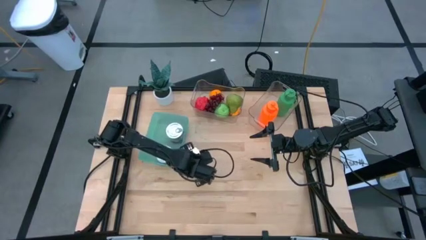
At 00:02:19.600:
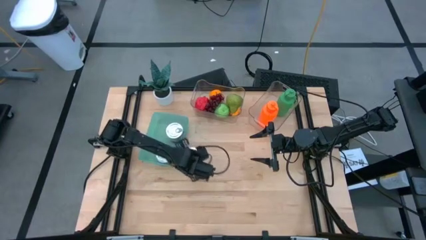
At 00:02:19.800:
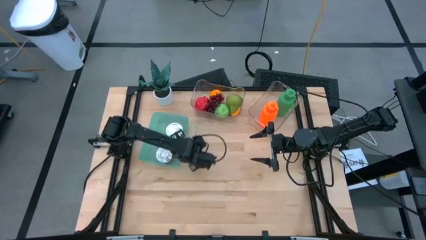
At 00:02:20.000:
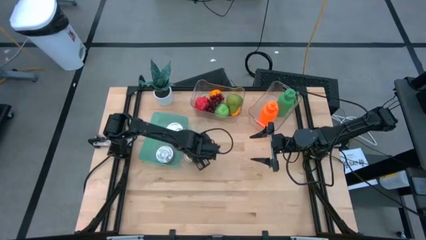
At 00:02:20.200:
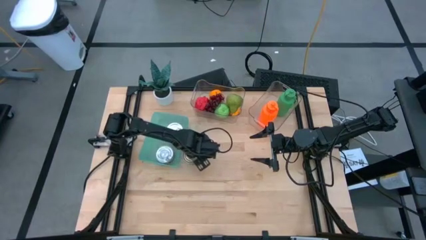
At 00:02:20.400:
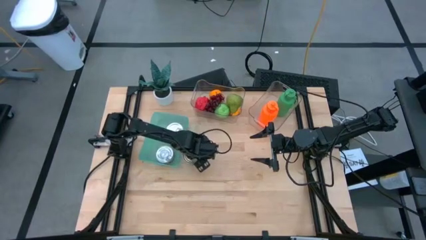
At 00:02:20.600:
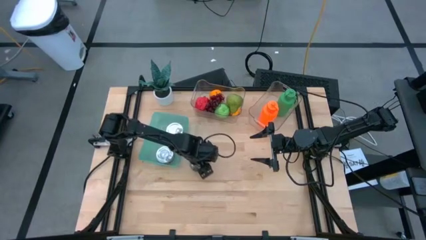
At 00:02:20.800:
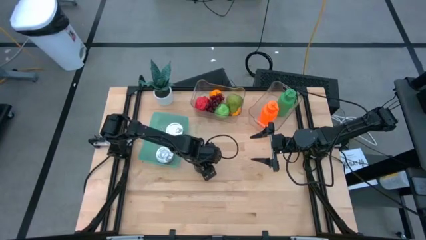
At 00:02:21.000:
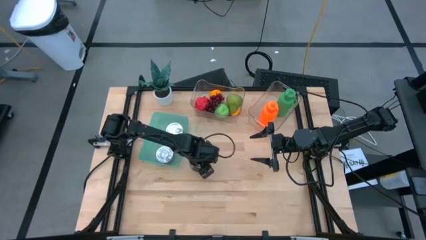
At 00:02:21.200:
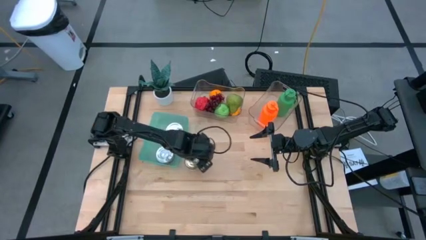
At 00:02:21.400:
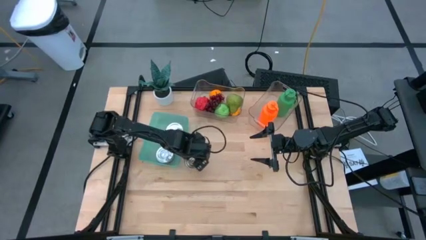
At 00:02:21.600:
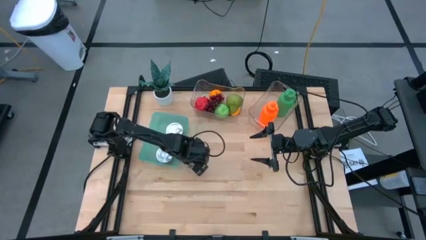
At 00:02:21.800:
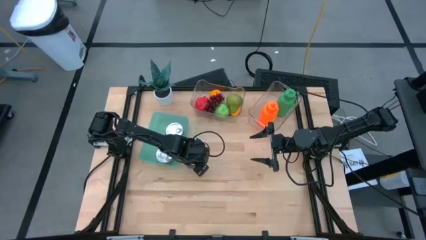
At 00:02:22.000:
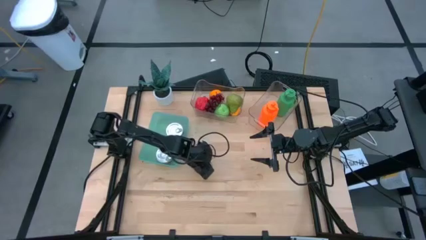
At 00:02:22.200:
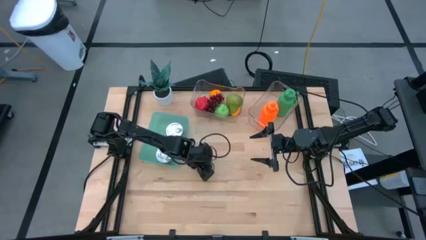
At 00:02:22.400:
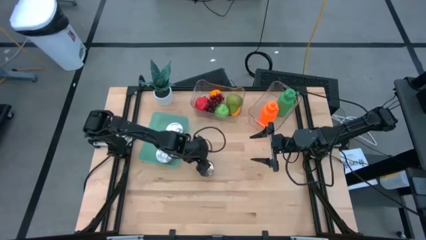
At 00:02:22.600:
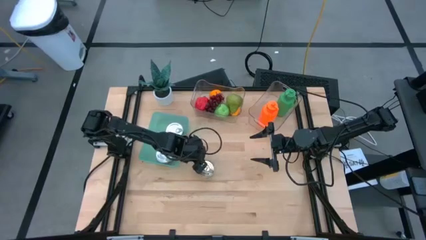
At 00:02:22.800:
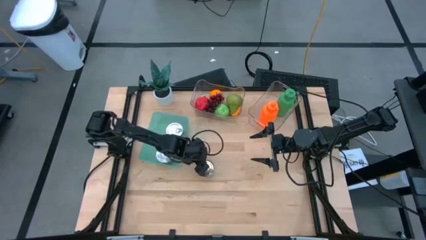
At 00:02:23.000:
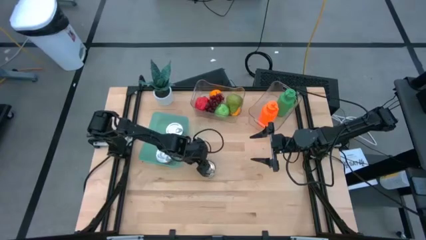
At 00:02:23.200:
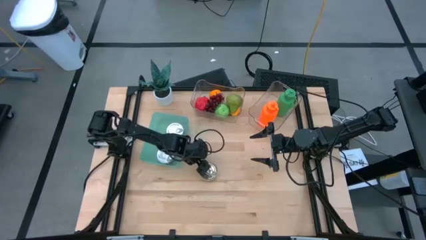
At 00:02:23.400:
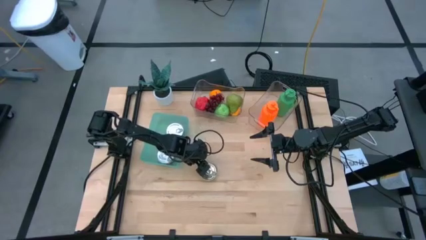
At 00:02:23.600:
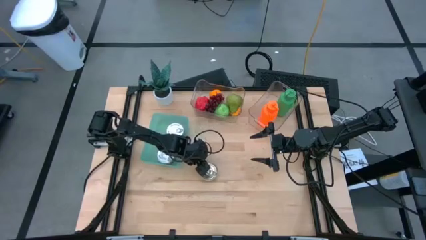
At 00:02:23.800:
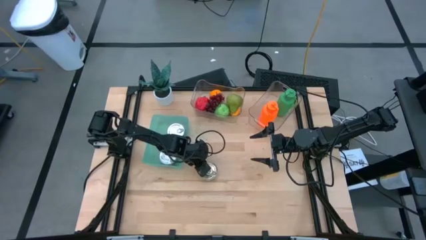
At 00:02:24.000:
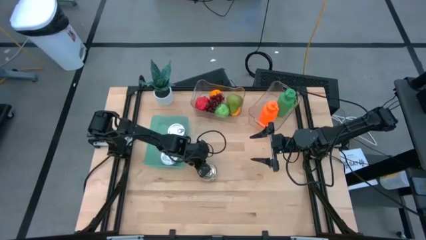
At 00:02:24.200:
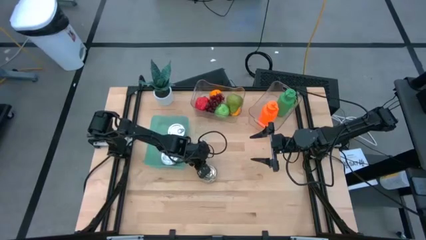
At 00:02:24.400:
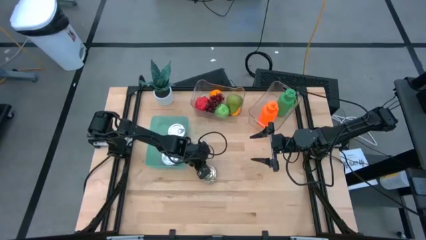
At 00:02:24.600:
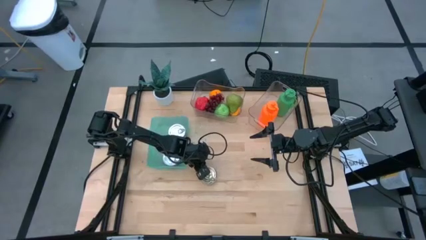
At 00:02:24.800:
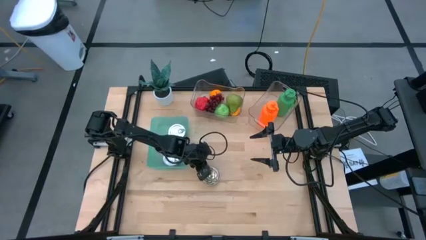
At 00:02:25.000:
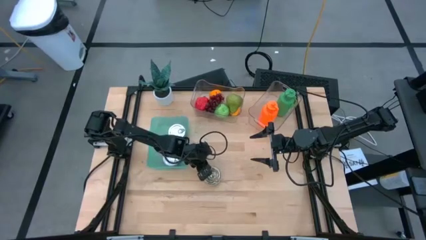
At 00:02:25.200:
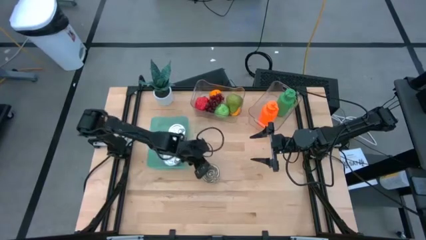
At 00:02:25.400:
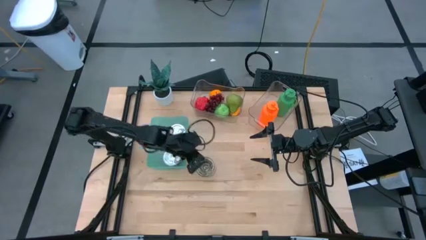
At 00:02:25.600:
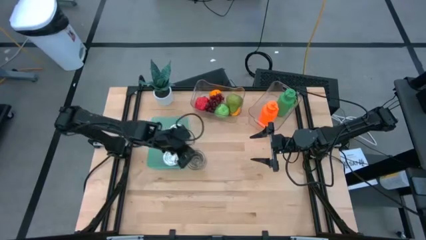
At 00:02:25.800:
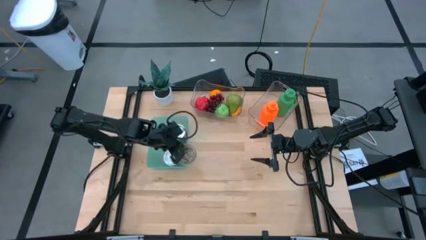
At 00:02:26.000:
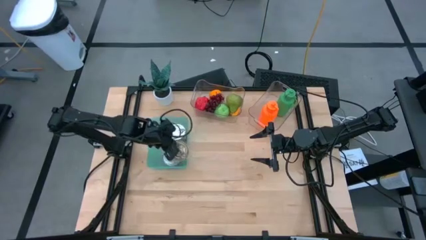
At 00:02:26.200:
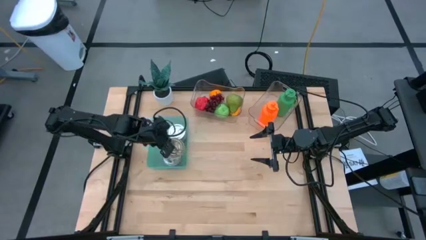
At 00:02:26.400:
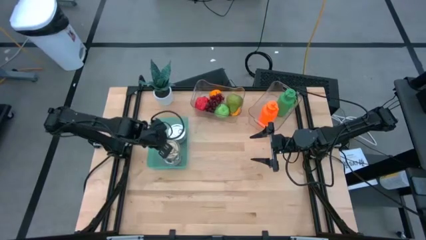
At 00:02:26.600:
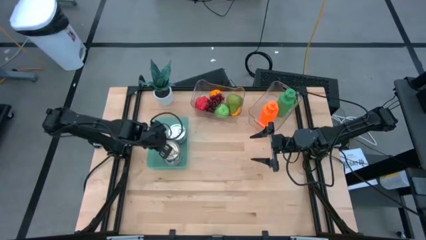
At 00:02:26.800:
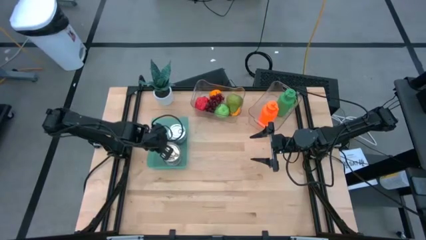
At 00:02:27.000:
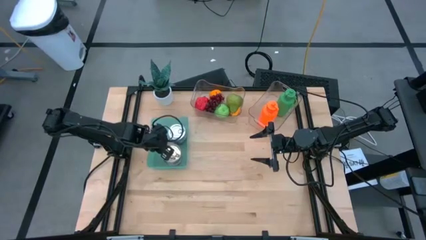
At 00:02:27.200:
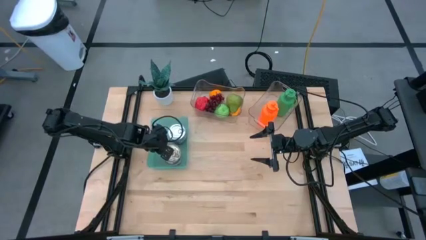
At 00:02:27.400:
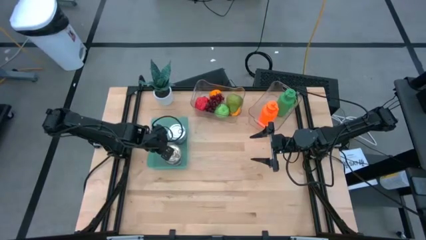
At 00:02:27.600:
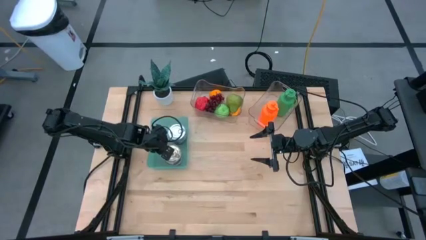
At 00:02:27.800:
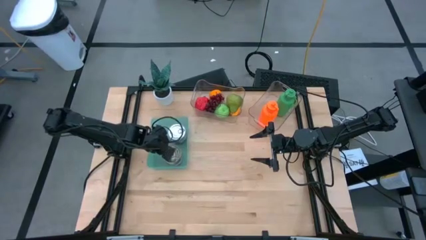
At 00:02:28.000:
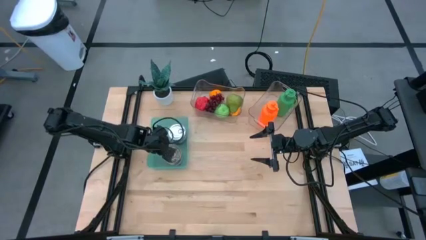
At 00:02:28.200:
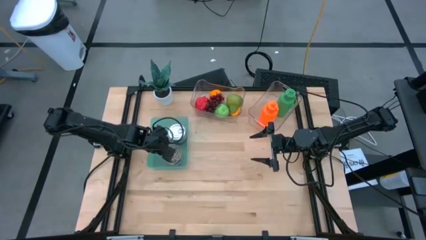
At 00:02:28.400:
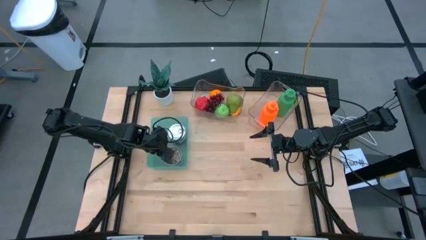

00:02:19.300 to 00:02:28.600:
Task: Pick & Place Food Item
Put the blue pink tuna can into the green bin

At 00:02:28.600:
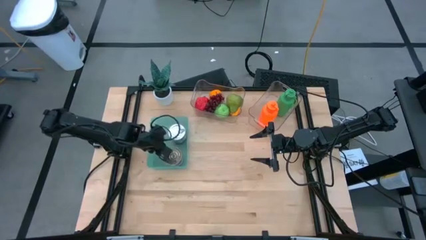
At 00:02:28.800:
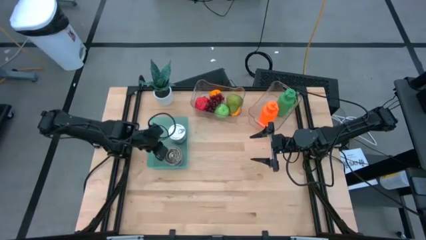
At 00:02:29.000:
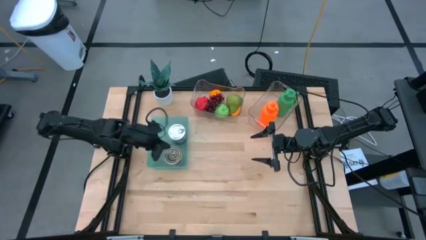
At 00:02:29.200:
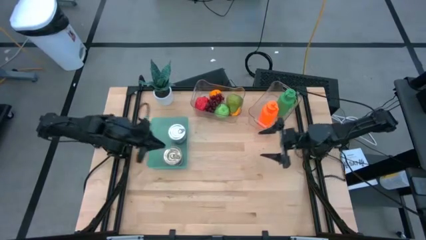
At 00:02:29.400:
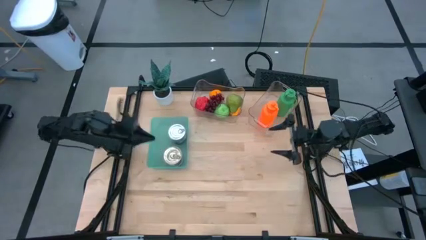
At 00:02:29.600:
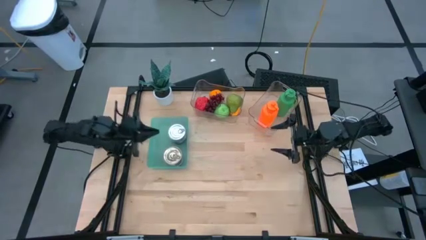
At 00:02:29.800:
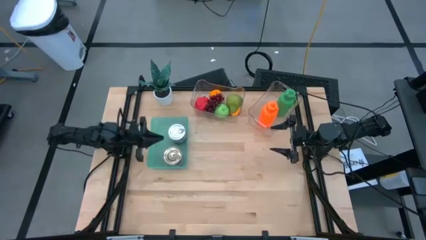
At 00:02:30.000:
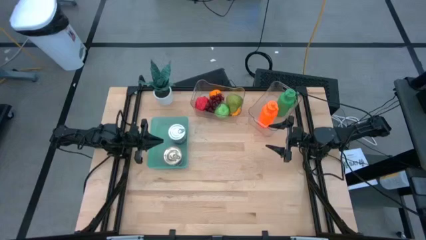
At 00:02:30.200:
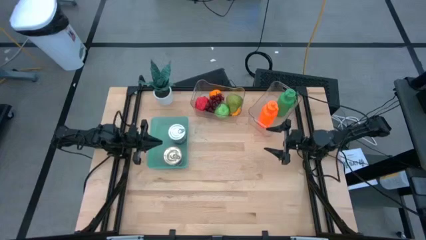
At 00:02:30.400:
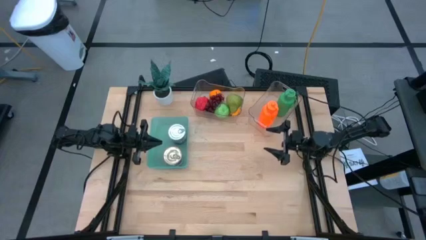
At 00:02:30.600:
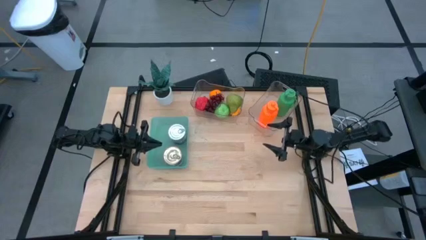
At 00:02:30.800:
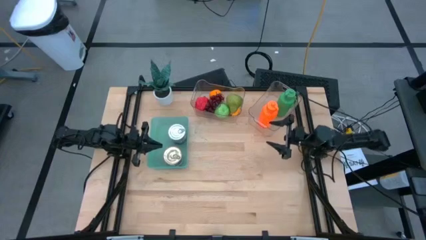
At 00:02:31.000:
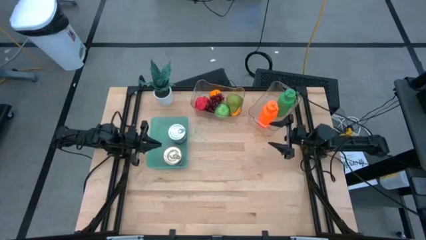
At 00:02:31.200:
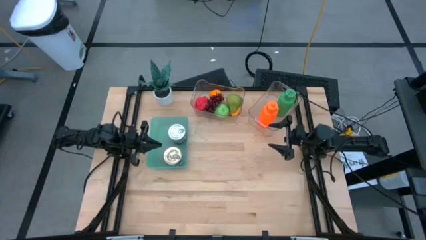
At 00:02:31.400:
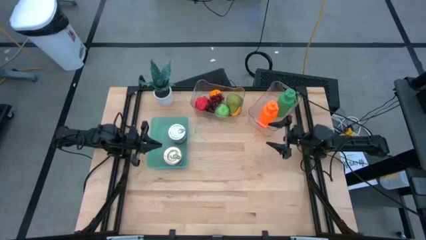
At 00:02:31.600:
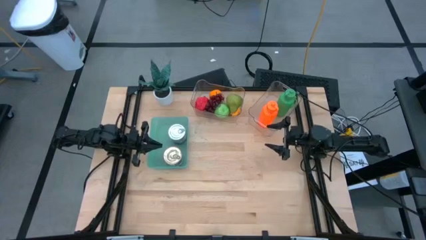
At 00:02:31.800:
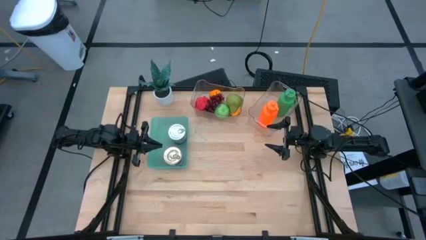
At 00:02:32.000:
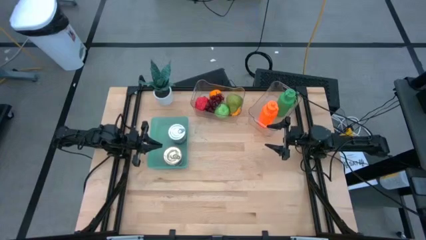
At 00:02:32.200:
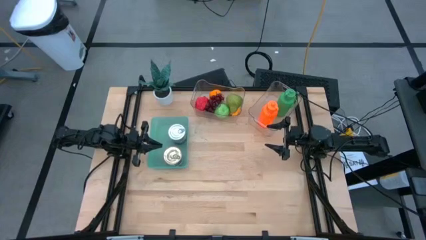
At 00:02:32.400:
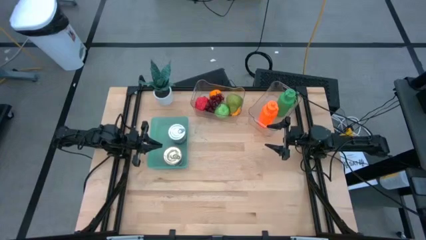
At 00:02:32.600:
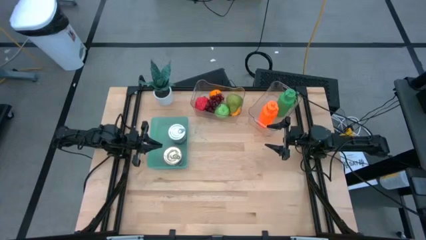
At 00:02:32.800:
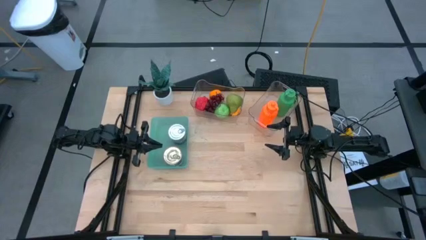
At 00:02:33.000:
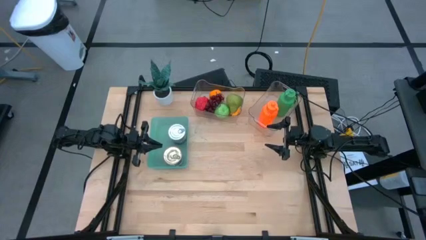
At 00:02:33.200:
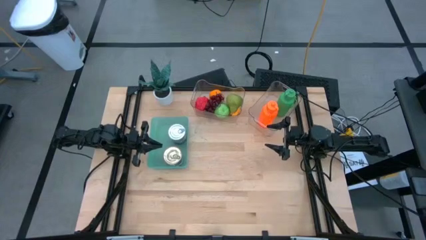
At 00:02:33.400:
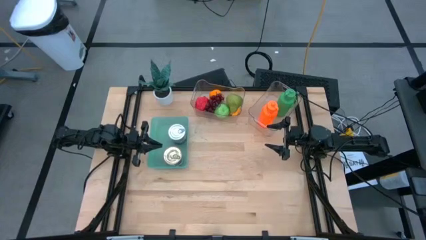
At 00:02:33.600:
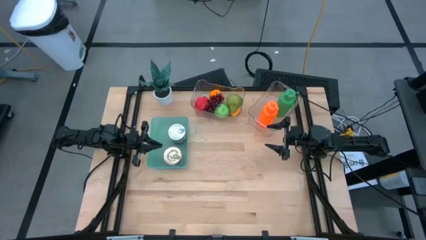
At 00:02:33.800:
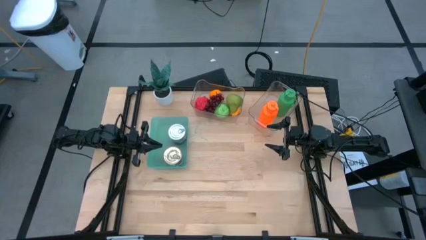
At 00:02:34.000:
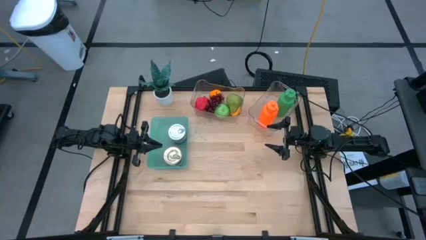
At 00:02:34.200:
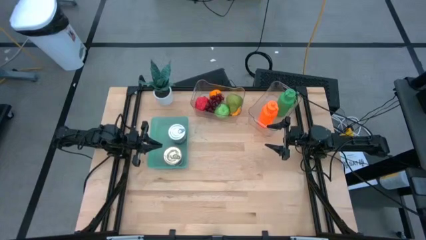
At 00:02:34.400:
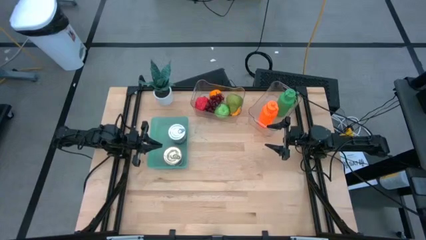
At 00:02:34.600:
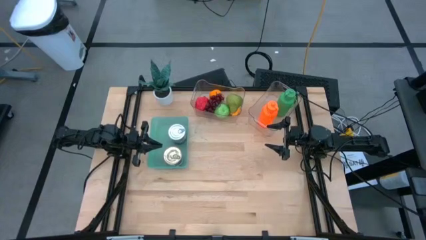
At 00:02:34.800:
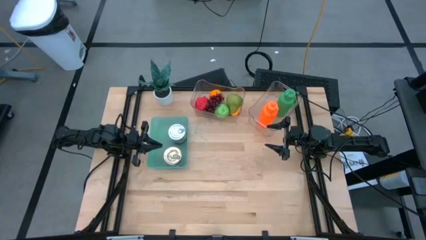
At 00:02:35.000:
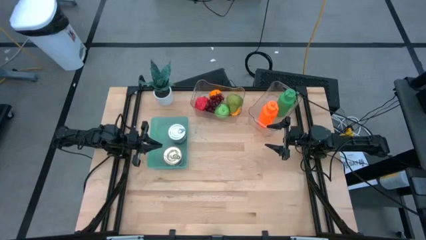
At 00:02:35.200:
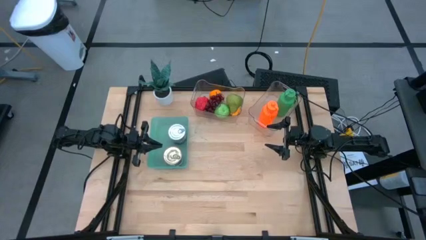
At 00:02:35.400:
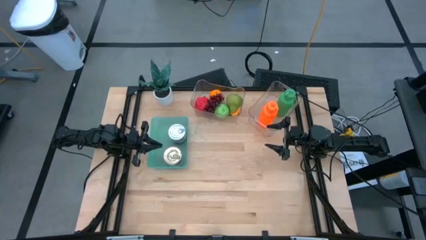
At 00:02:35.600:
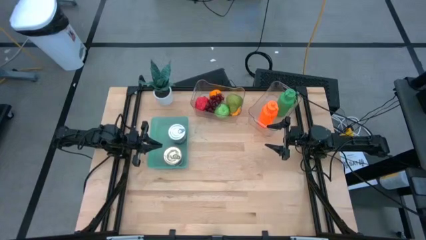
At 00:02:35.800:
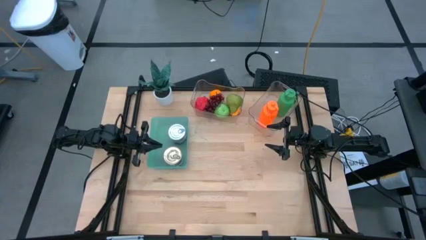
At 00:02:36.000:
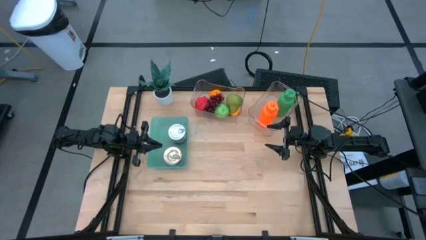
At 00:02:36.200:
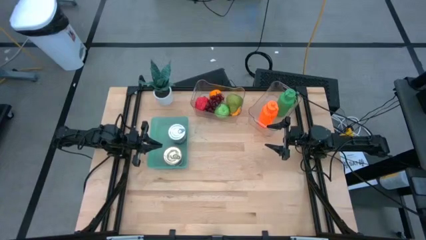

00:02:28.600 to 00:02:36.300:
Return to Home Position
